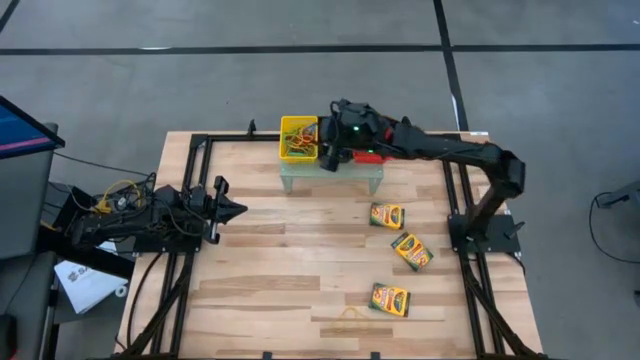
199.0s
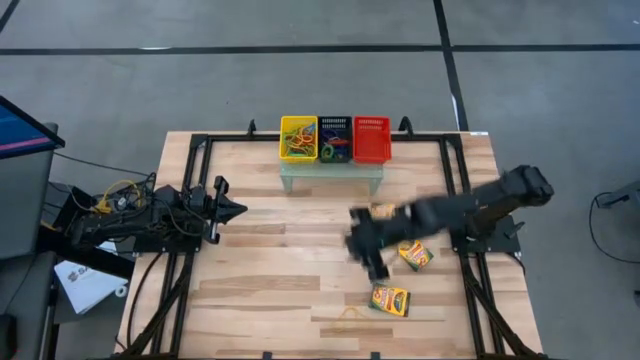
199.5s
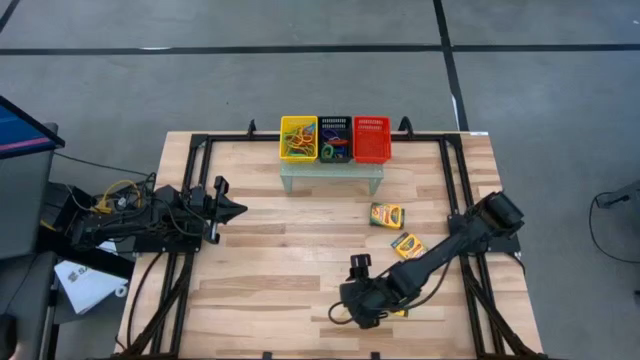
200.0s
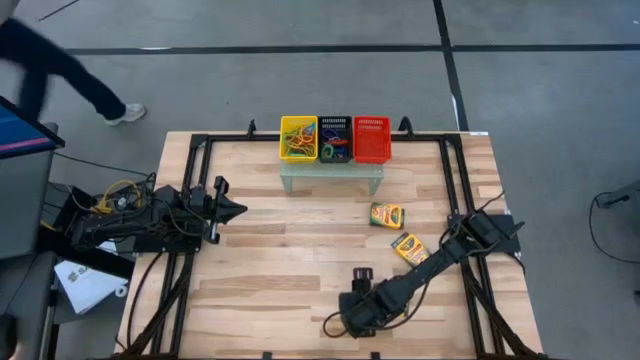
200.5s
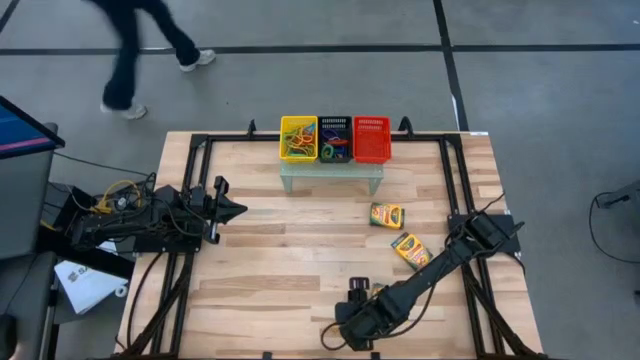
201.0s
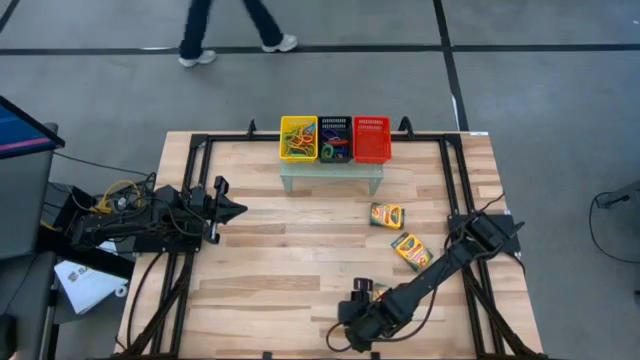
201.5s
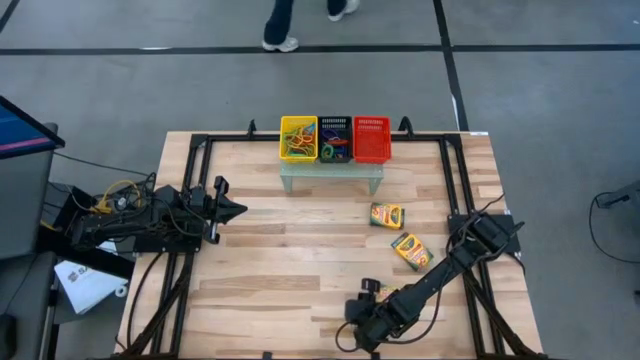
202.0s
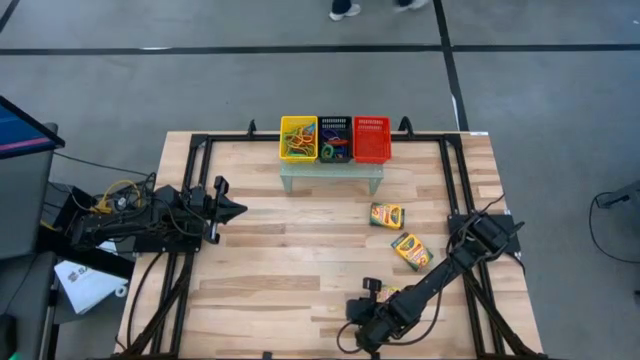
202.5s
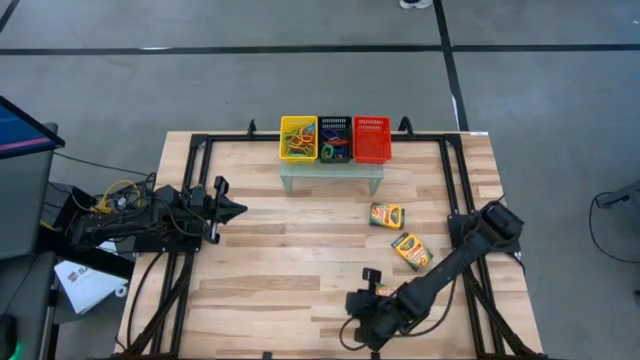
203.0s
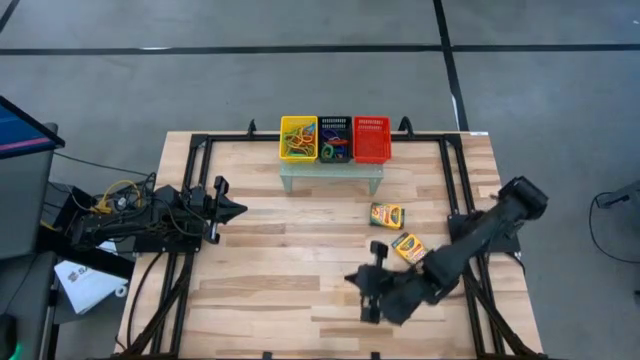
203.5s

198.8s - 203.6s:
Task: Pick & Place Office Desk Supplies
Put the big yellow rubber band into the yellow bin on the shelf

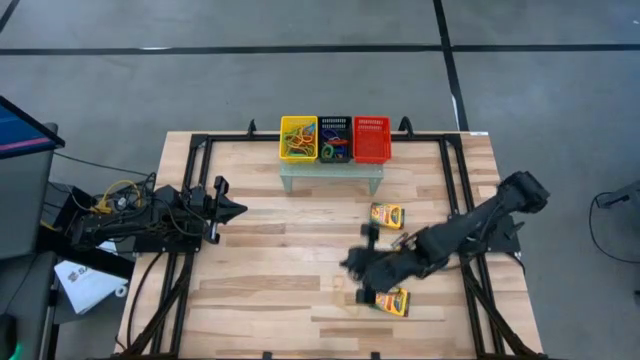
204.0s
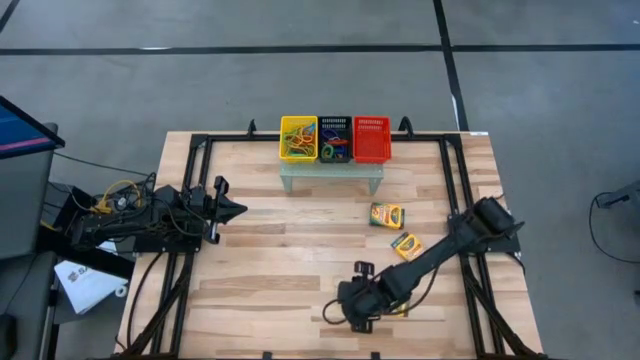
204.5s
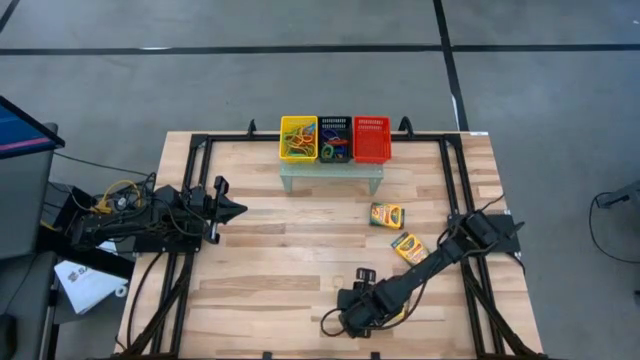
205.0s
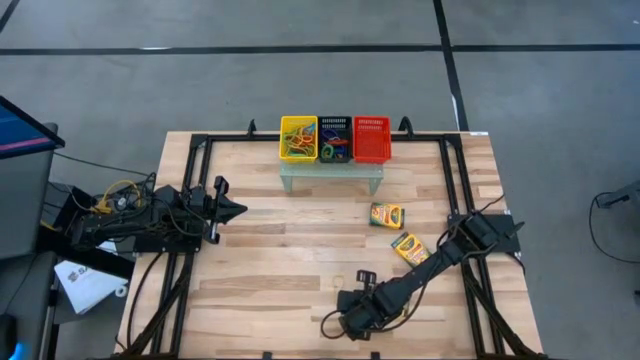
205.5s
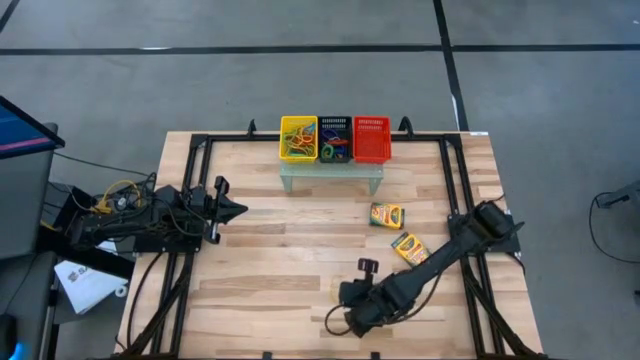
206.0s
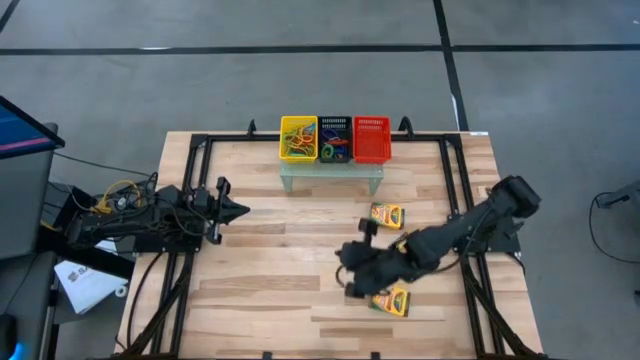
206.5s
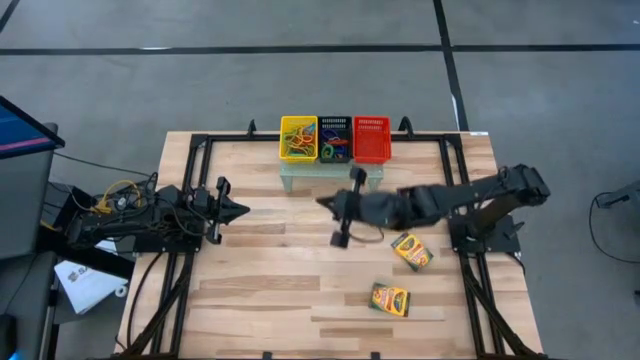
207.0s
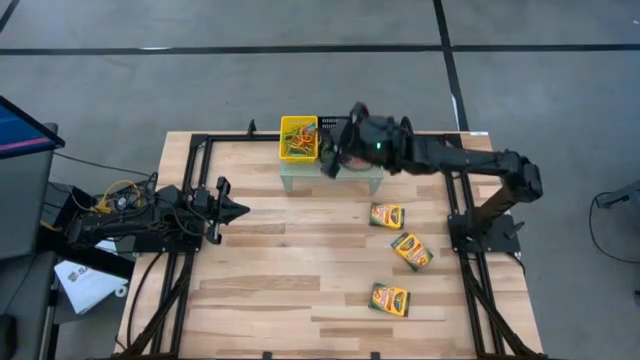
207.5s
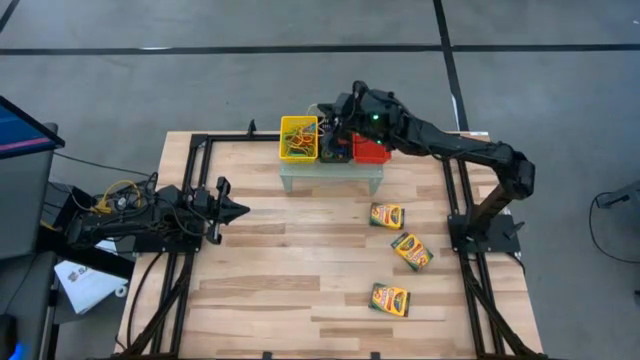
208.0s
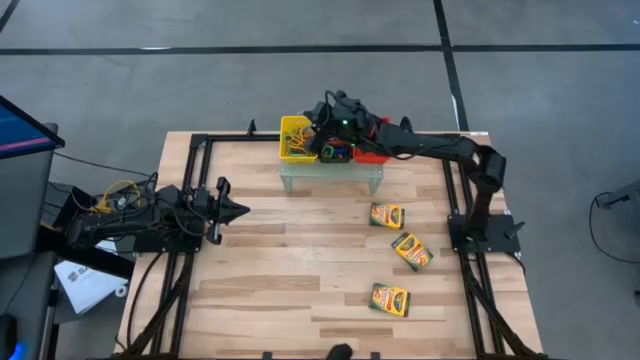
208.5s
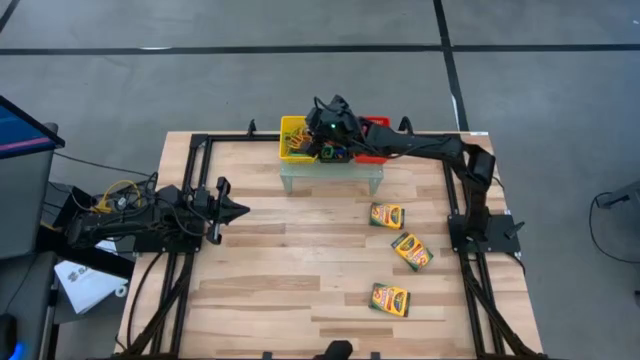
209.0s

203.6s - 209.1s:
Put the big yellow rubber band into the yellow bin on the shelf

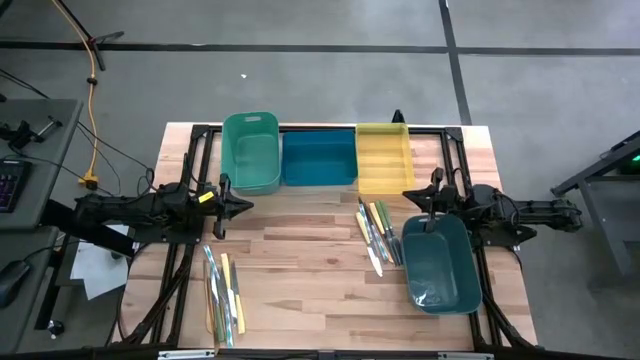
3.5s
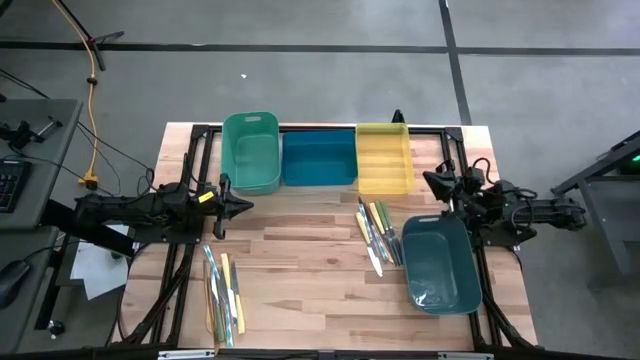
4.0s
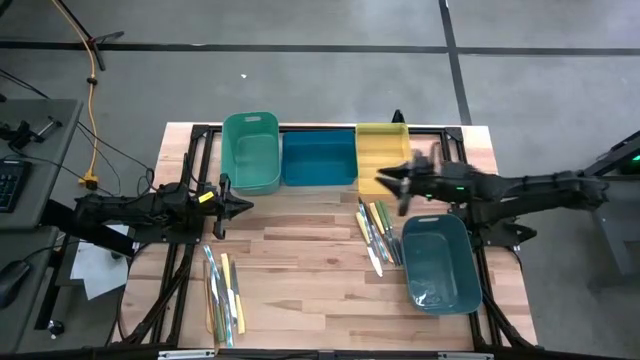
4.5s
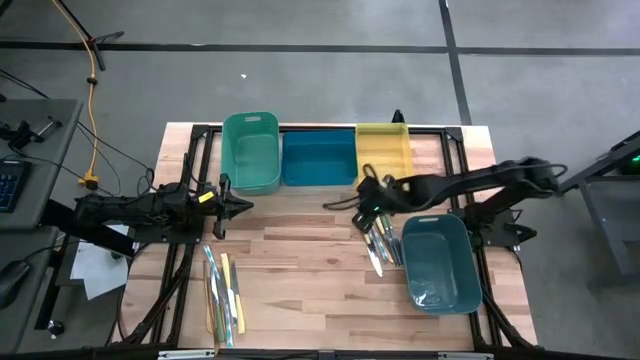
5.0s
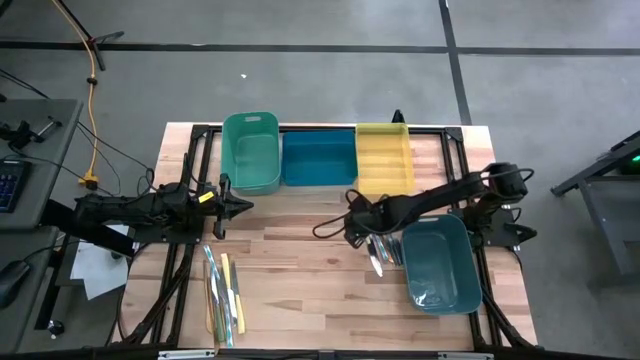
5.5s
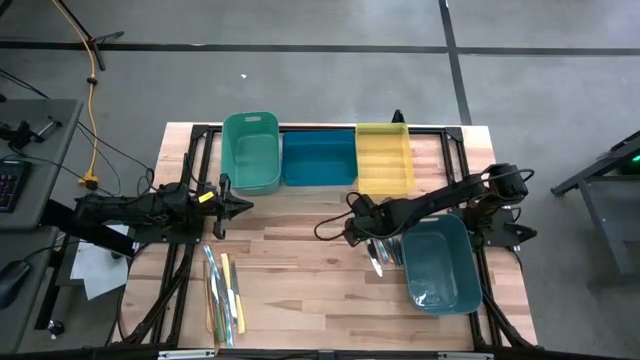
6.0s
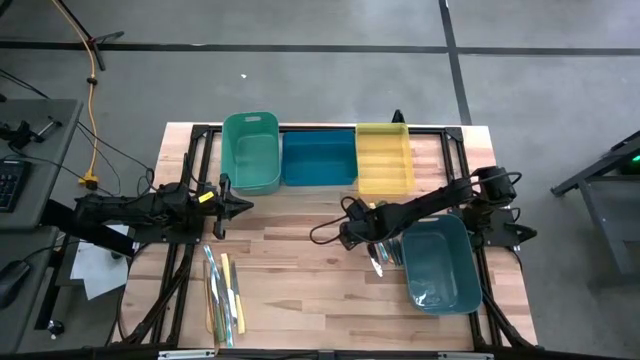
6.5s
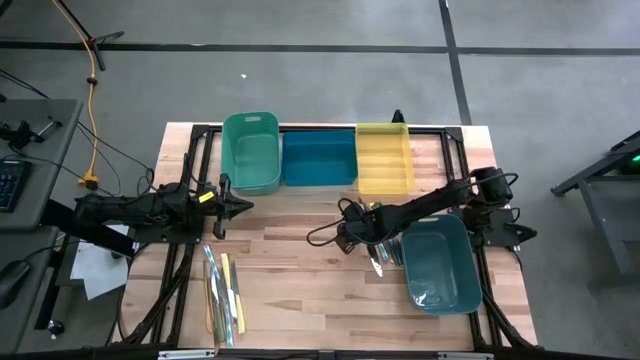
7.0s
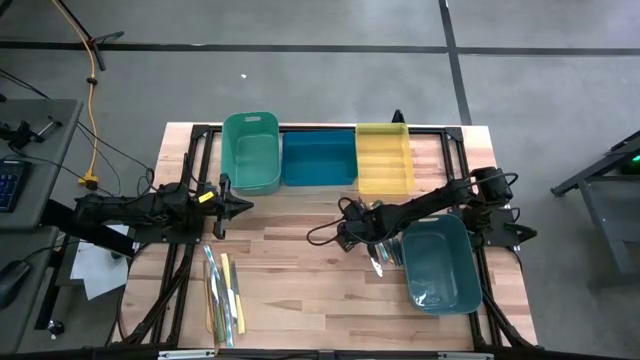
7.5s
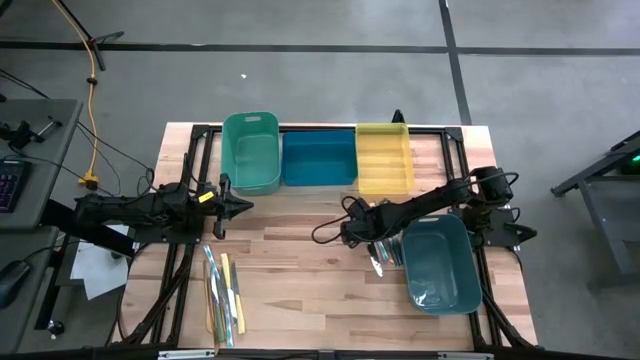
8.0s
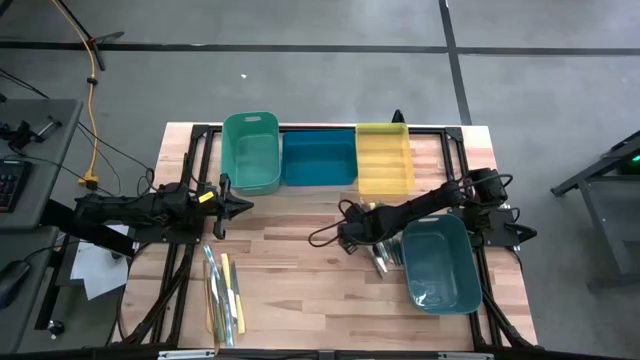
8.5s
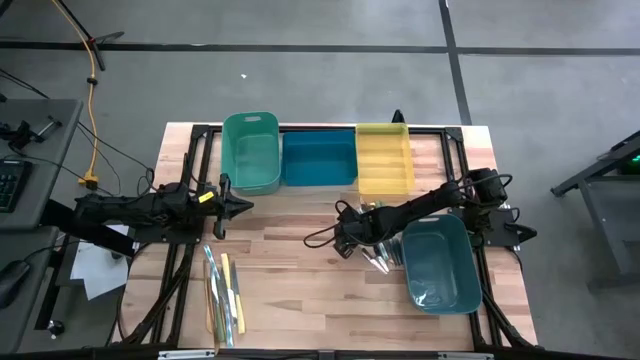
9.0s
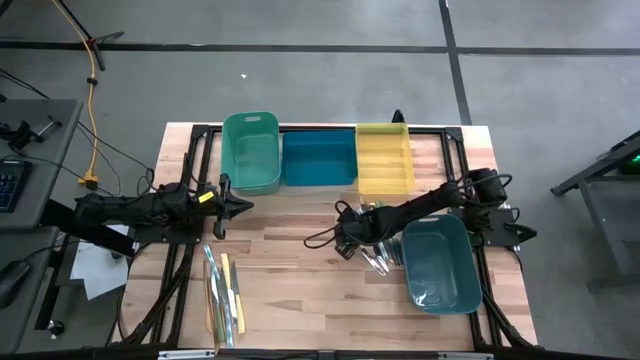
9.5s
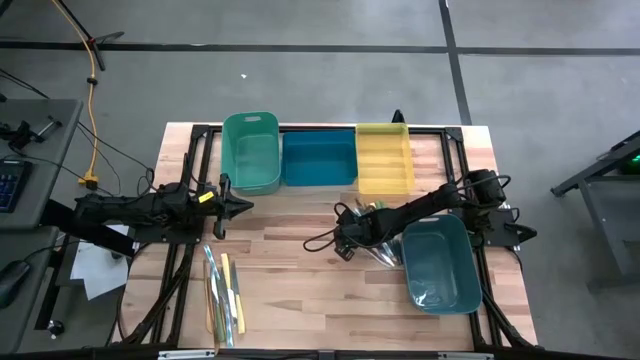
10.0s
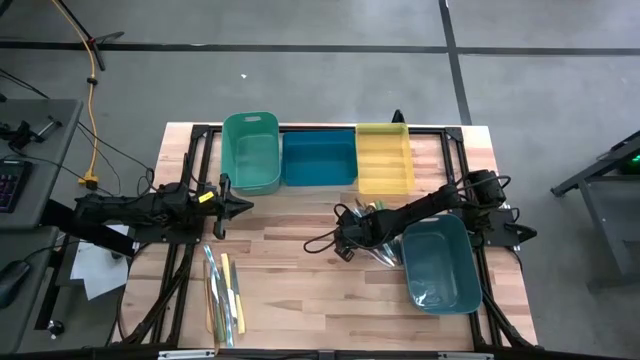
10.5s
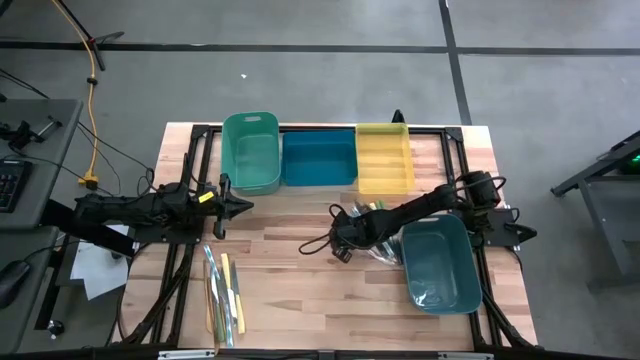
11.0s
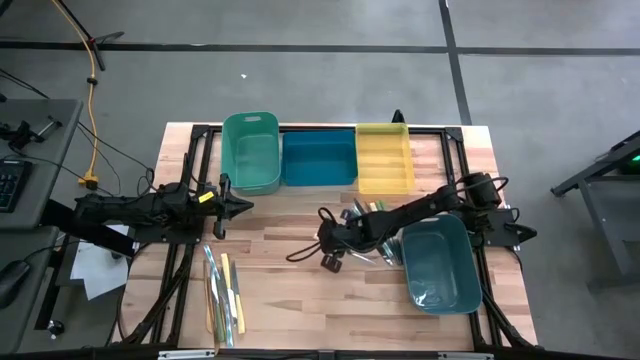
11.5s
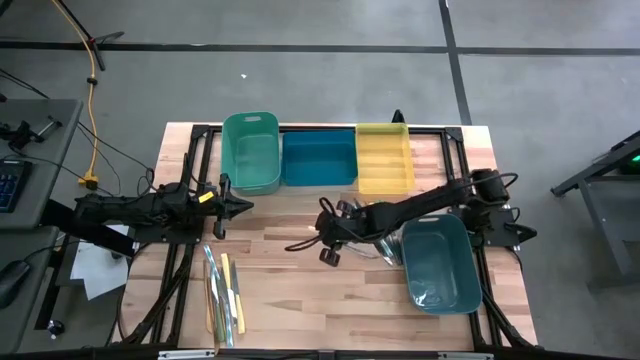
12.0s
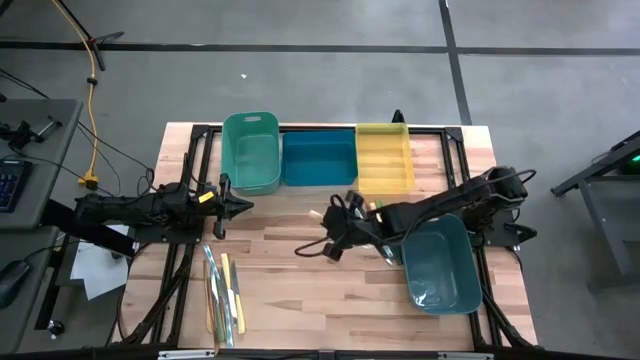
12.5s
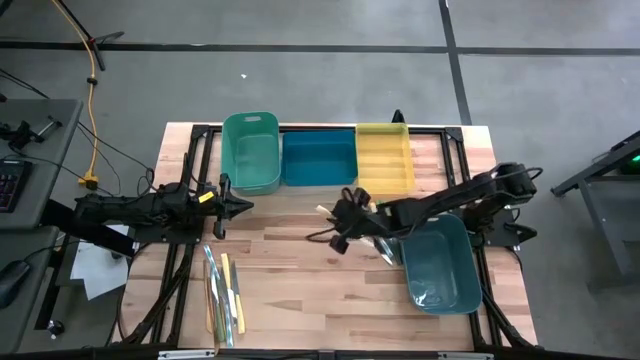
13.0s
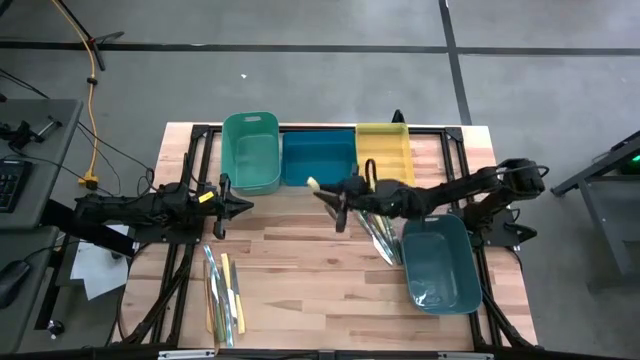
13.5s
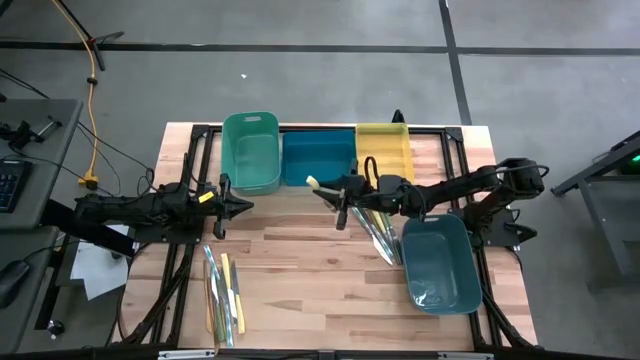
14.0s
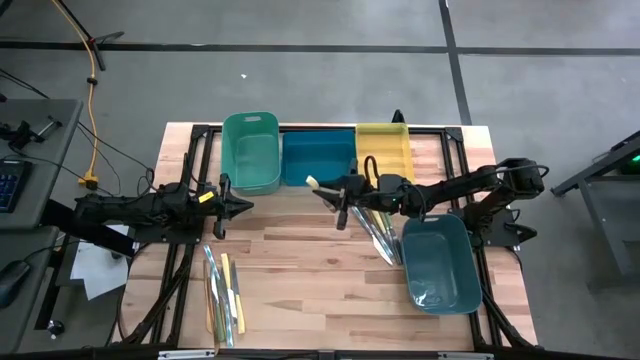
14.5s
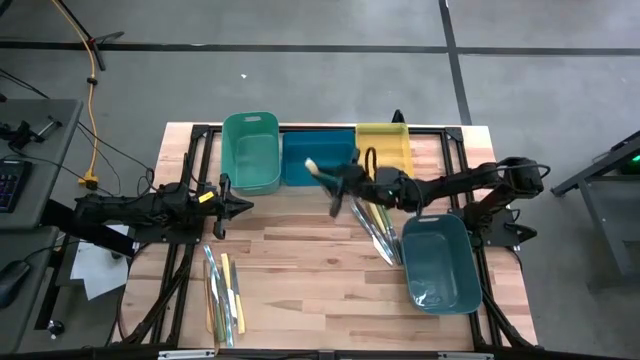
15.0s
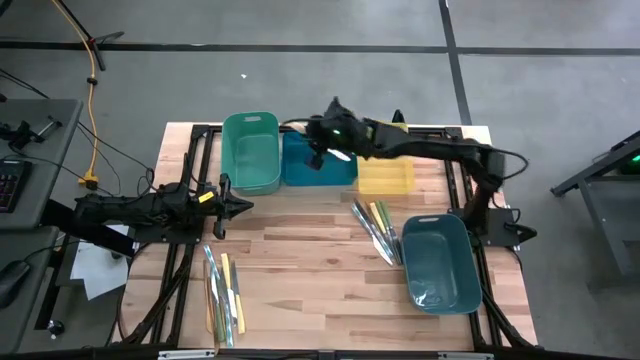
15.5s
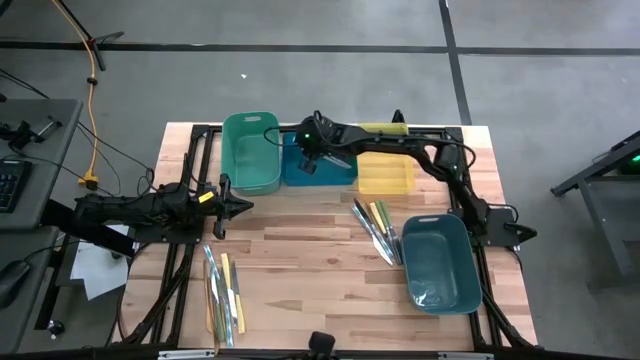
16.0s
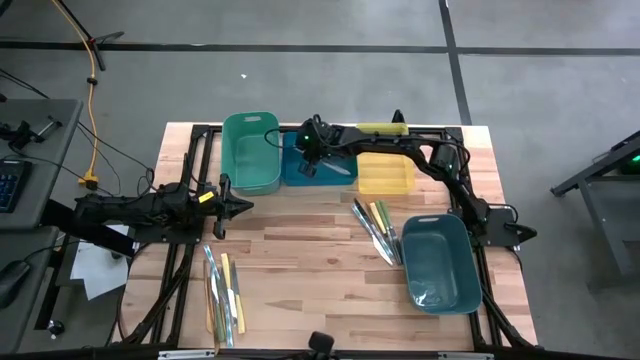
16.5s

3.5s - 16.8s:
Task: Sort silverware by color (type)
Put the yellow knife into the blue bin
